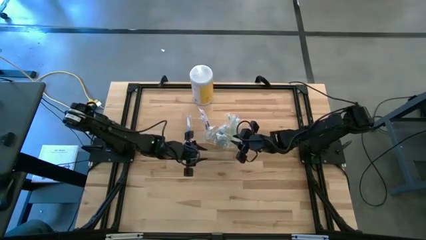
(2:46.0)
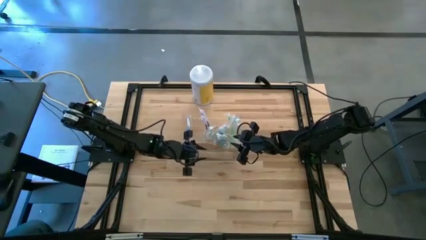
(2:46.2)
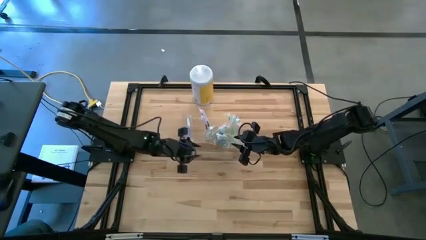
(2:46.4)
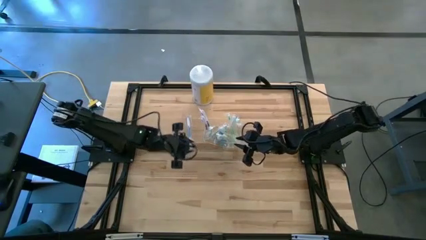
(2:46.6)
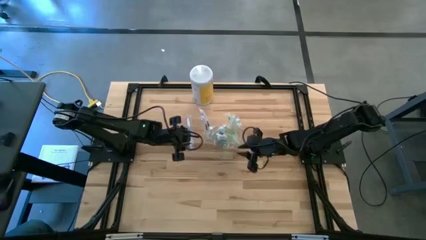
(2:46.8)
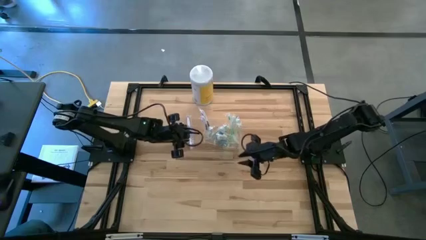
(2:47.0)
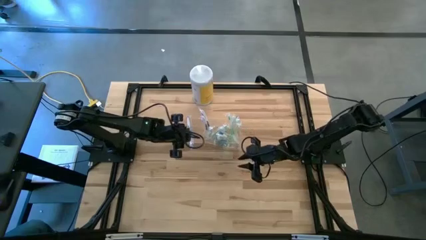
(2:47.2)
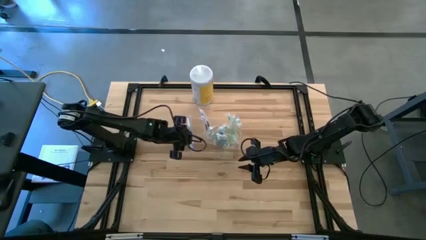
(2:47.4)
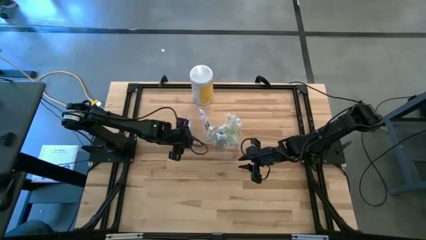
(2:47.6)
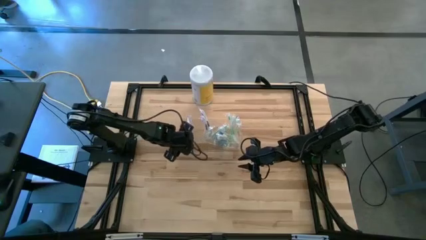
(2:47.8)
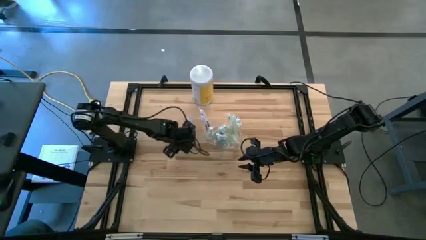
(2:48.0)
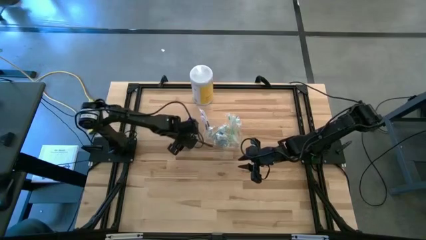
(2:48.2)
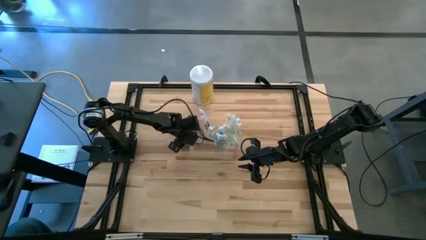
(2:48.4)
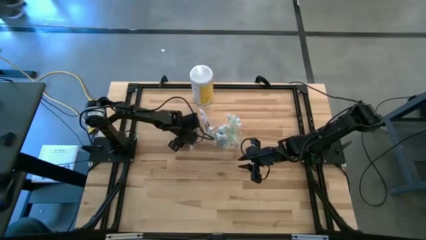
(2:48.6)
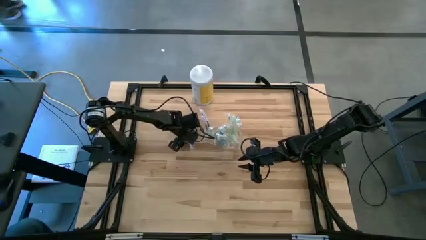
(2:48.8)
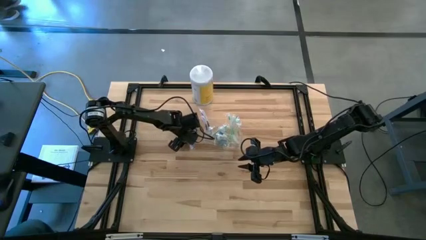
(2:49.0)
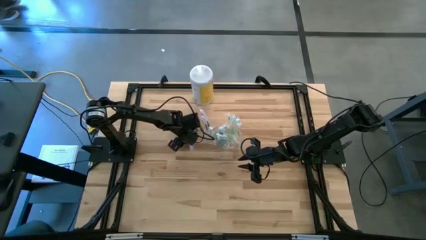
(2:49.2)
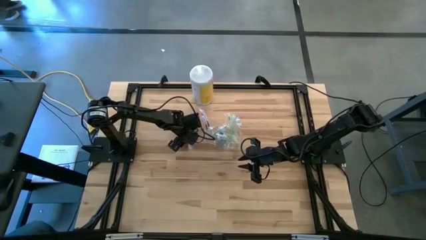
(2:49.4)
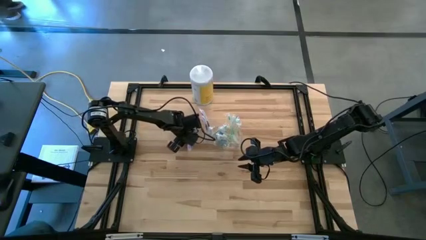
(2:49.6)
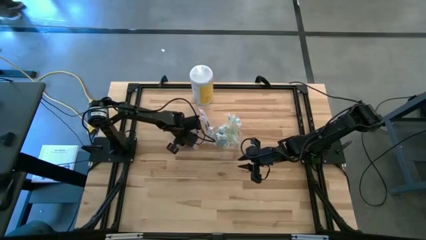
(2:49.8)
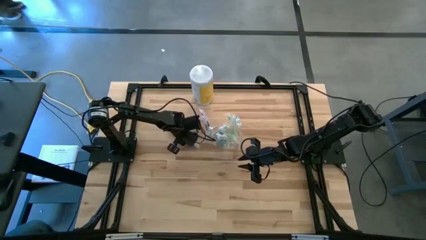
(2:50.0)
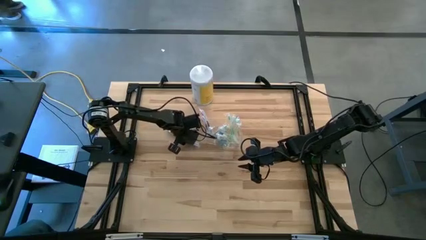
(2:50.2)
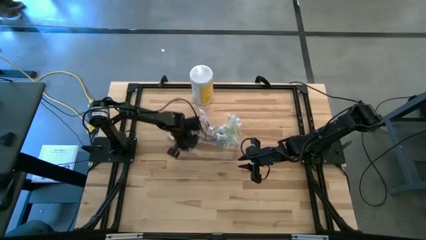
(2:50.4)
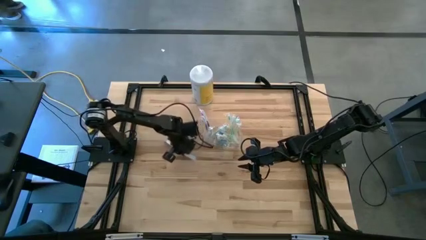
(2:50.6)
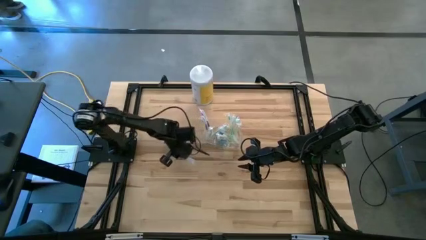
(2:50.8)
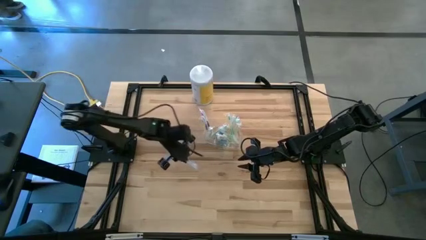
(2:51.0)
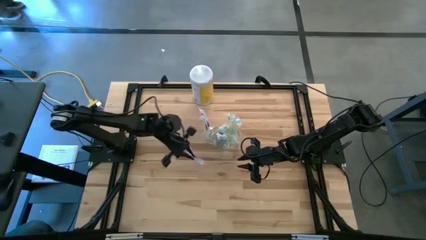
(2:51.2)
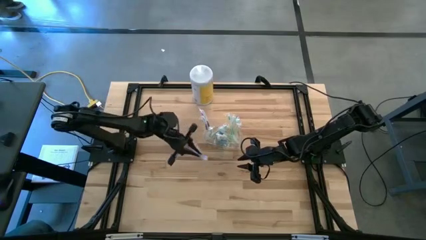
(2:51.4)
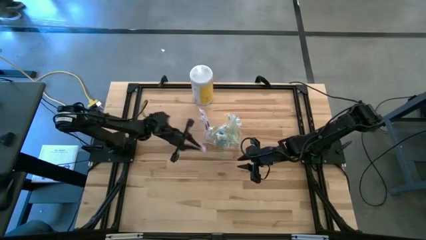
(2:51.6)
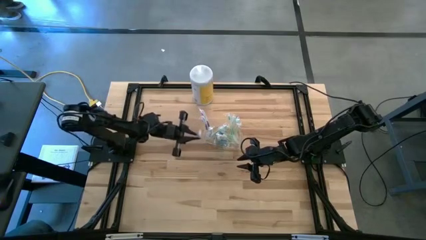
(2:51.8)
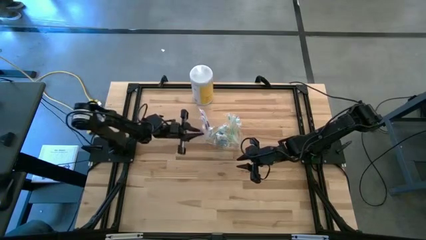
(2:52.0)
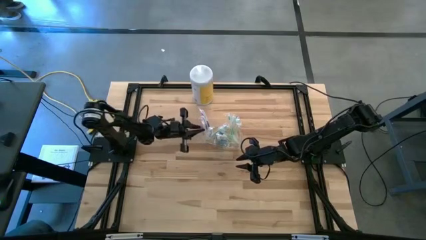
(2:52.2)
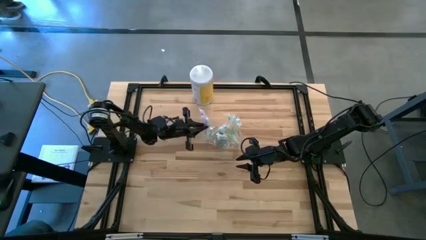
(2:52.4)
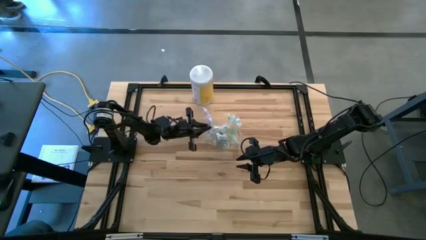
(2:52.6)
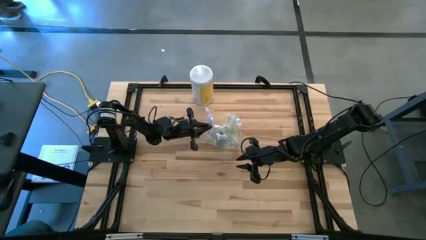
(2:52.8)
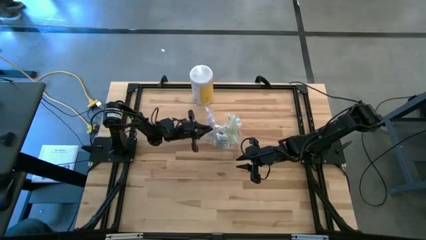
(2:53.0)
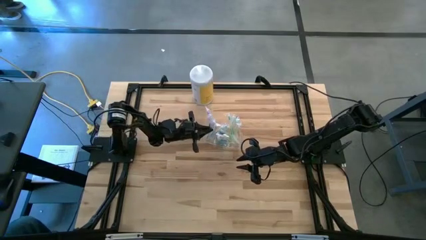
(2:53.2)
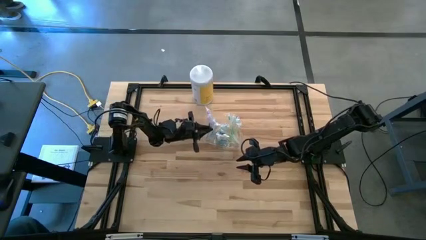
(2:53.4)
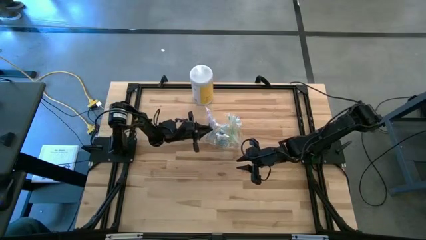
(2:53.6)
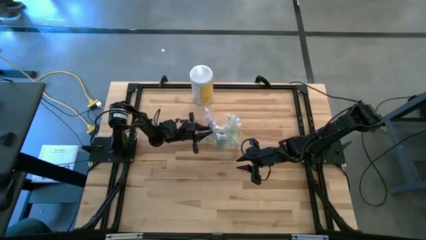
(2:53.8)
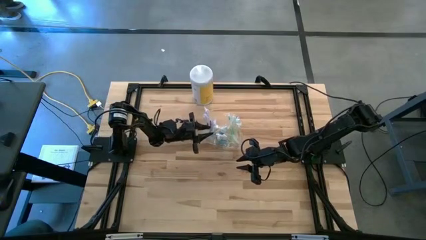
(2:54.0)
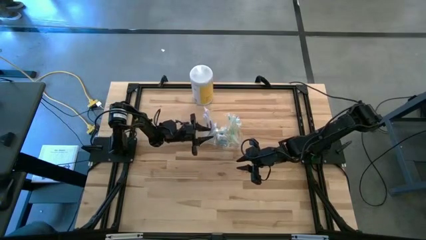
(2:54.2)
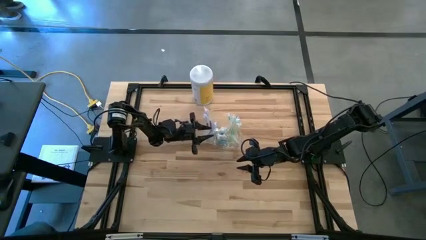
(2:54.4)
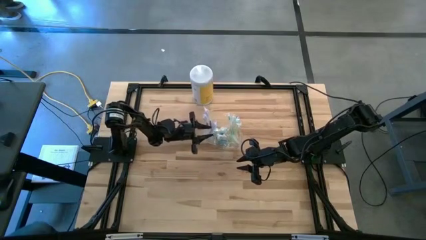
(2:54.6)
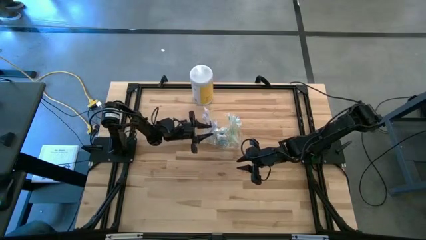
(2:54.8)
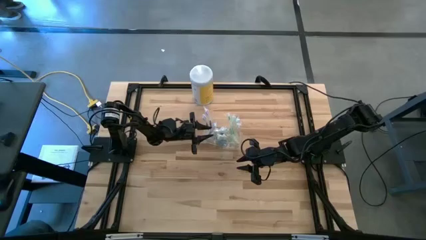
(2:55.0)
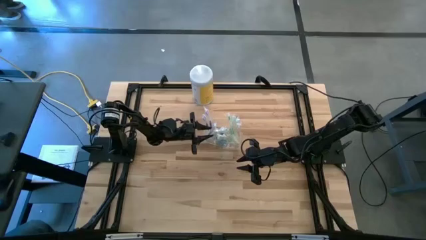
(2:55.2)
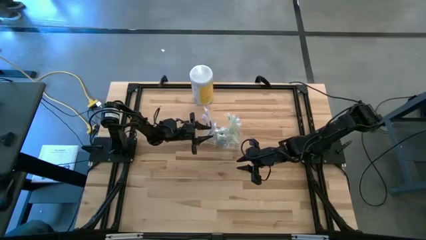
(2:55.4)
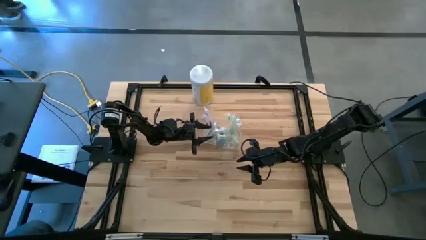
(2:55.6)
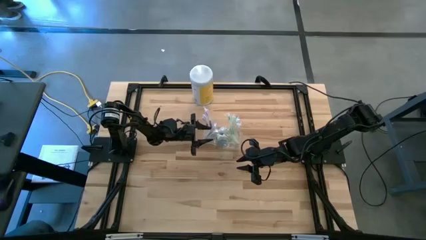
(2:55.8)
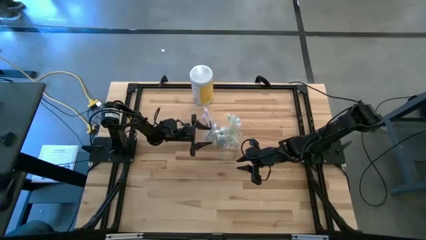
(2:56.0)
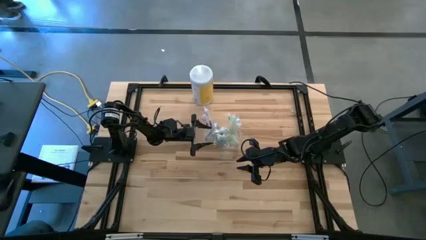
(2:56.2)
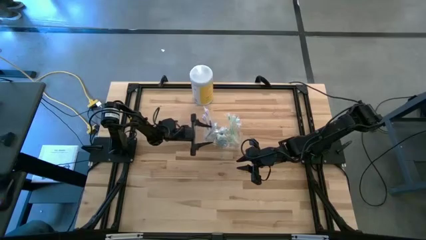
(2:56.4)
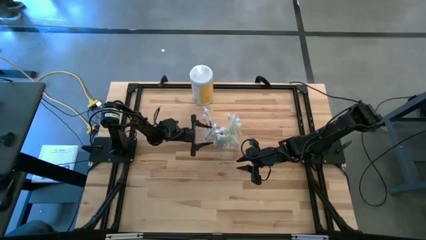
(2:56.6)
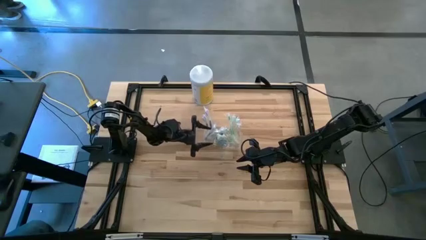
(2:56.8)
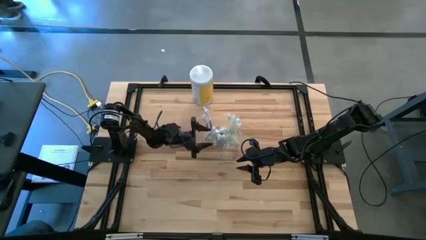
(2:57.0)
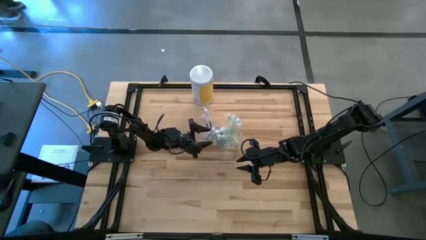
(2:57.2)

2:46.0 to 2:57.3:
Task: Pick & Place toothbrushing station
Put the blue toothbrush into the left section of the transparent organizer

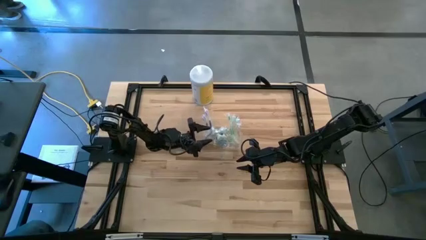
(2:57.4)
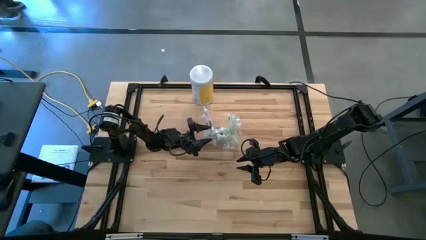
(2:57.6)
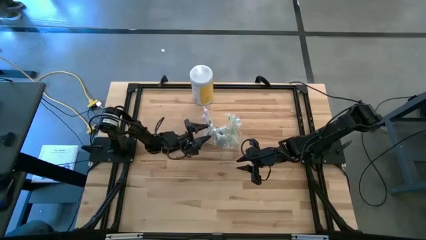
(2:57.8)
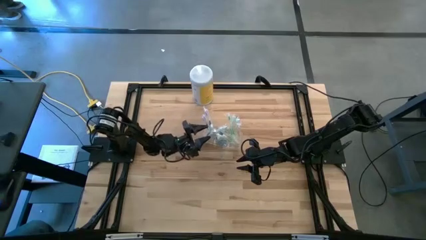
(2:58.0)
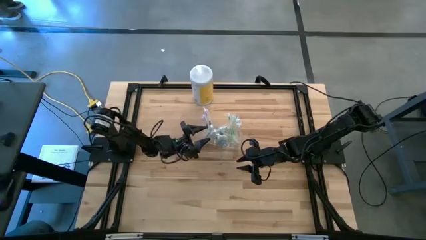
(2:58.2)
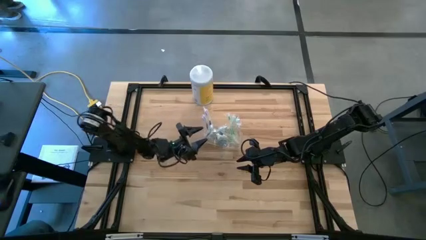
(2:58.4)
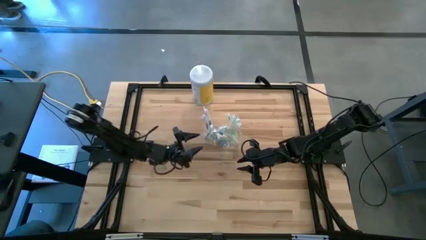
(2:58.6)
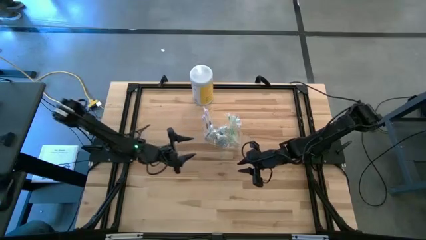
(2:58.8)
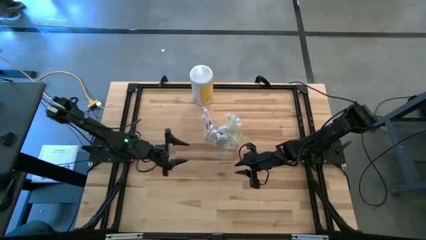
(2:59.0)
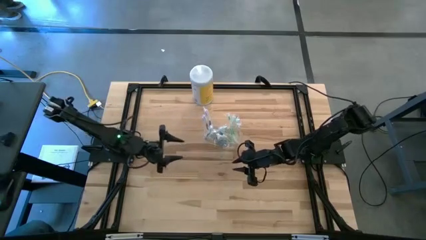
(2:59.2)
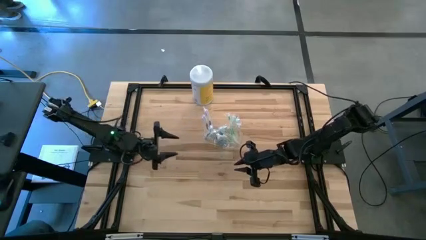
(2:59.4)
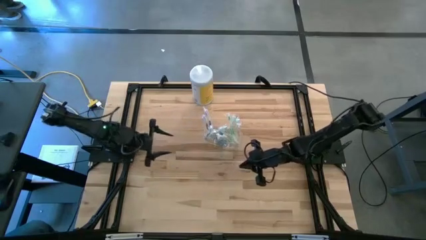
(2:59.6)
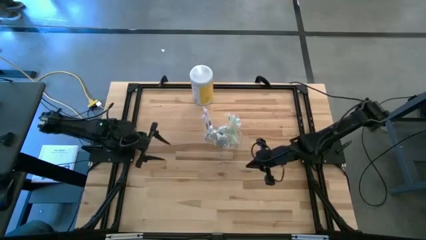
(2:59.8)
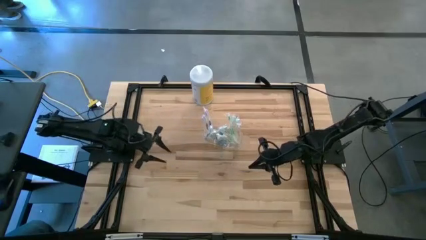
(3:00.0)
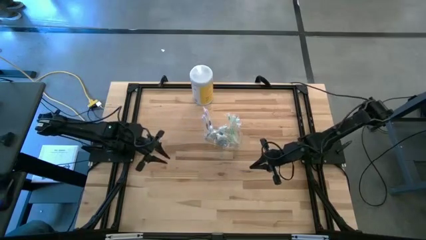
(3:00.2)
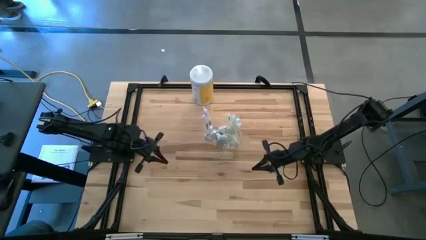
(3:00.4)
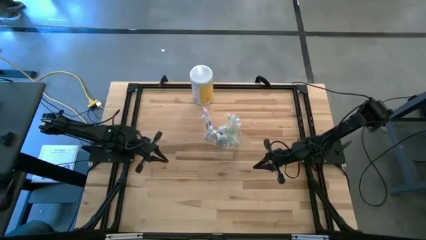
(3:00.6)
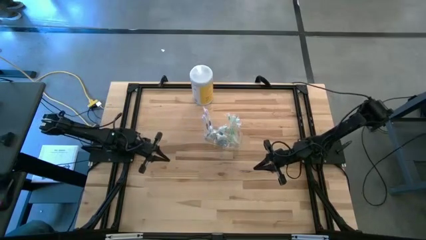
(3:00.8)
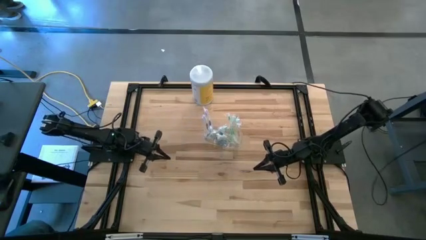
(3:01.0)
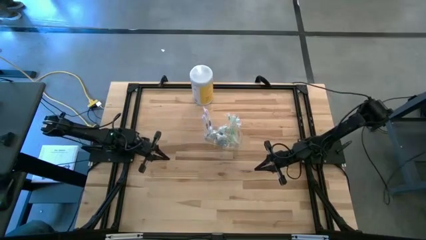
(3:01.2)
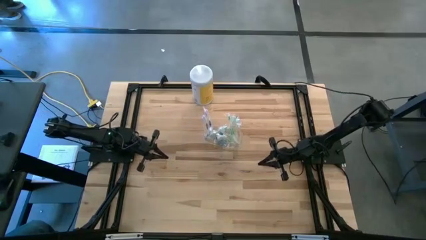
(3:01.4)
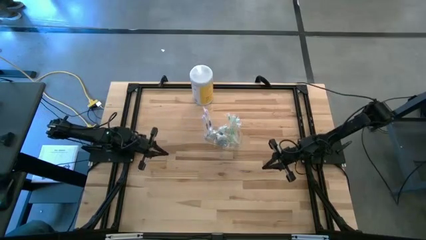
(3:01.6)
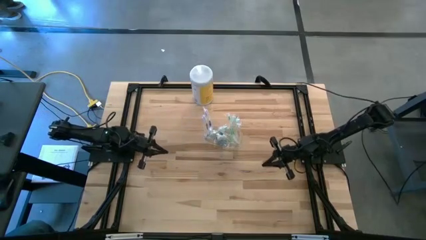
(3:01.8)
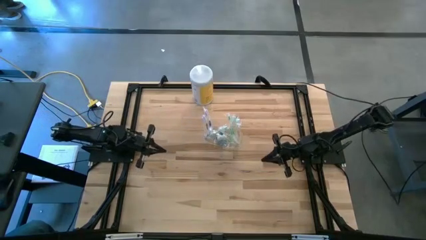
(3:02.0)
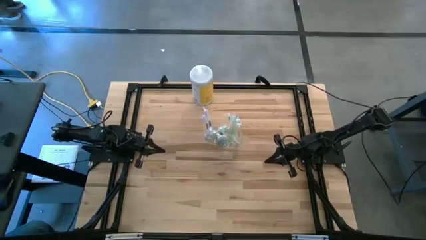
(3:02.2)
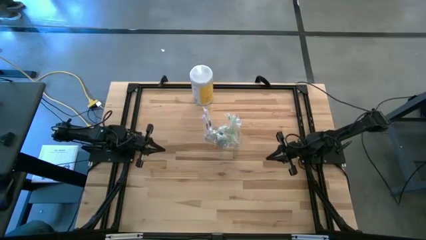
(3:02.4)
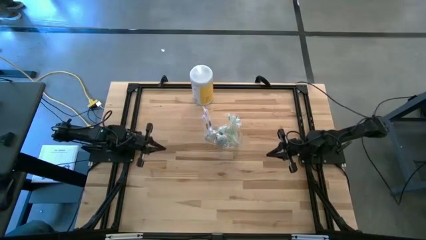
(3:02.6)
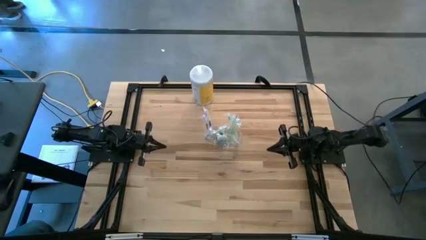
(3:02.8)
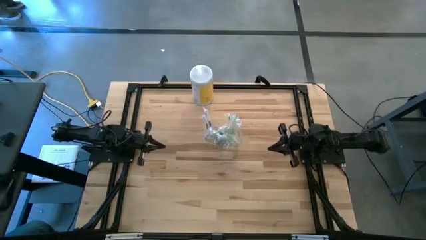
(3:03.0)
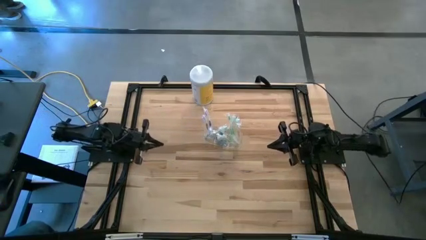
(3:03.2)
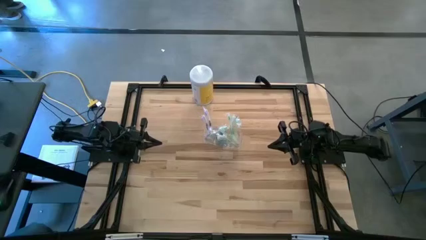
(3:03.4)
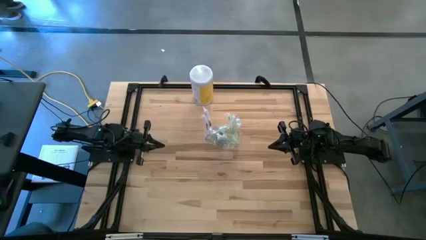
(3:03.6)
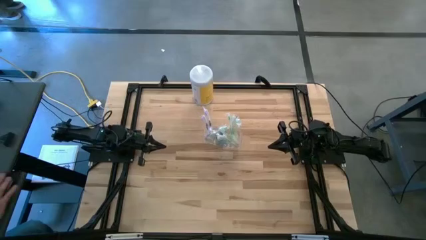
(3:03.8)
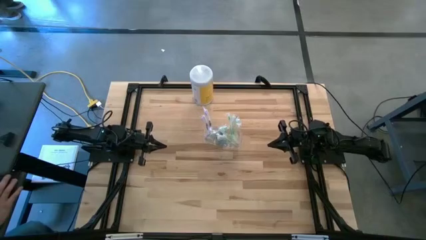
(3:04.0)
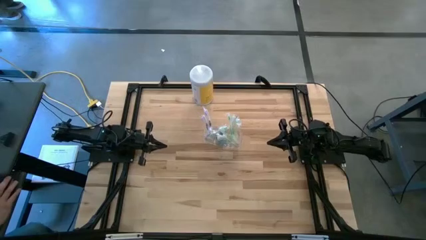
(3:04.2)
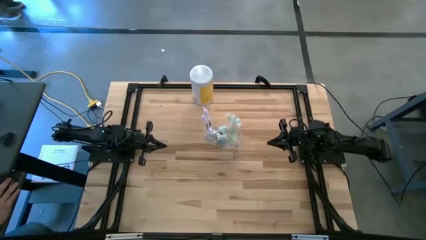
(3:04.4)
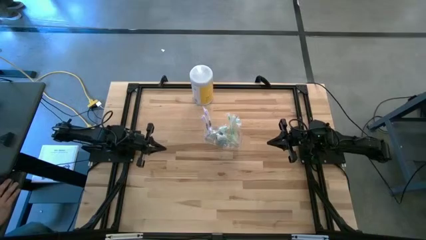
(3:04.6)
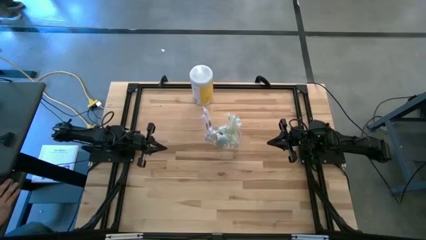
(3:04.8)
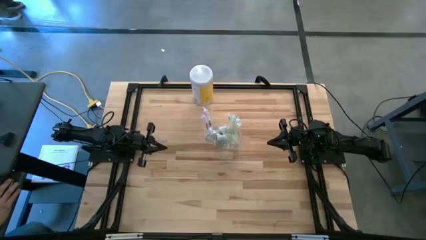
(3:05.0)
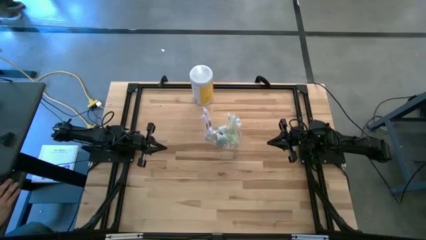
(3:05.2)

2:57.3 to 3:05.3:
Return to Home Position
